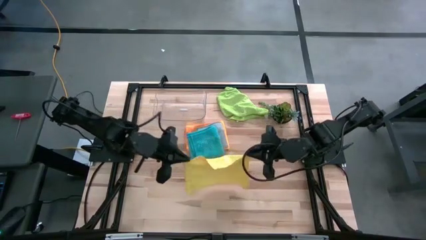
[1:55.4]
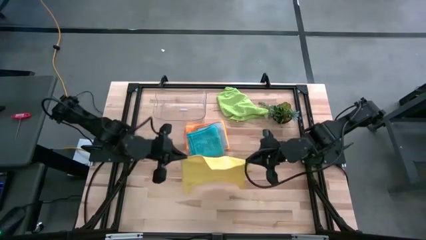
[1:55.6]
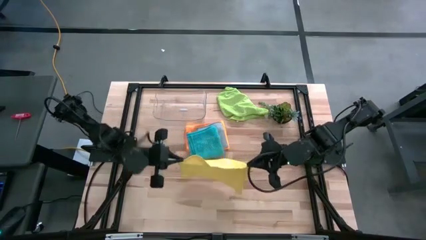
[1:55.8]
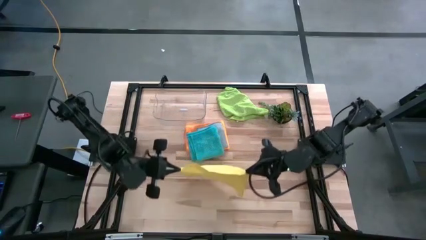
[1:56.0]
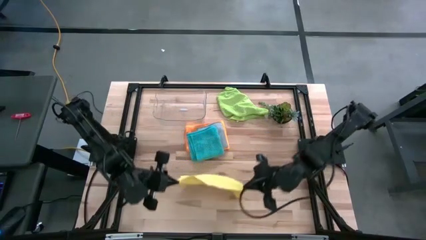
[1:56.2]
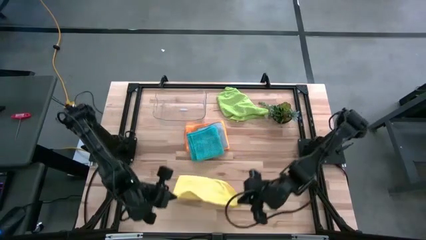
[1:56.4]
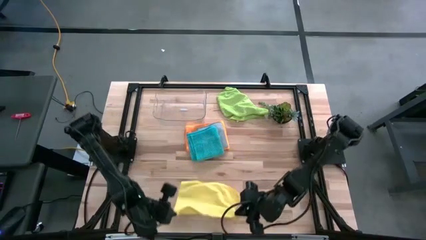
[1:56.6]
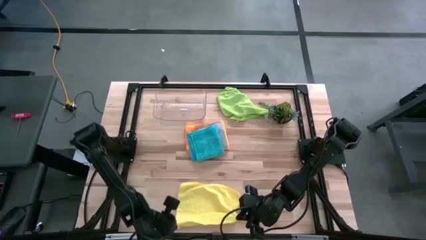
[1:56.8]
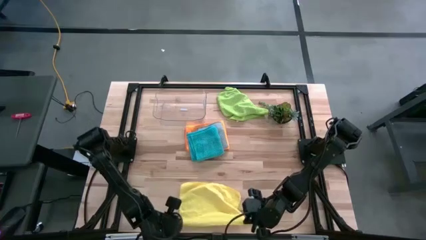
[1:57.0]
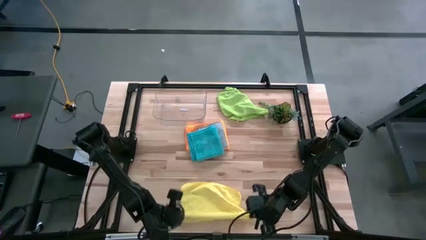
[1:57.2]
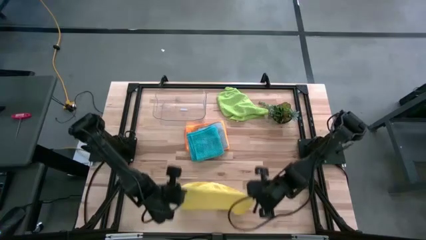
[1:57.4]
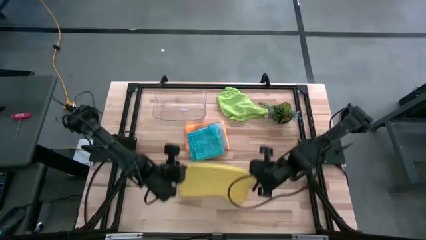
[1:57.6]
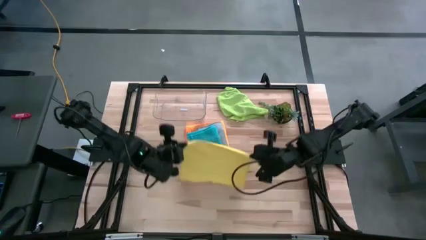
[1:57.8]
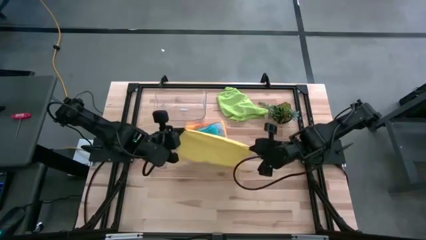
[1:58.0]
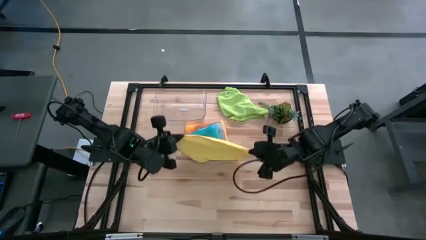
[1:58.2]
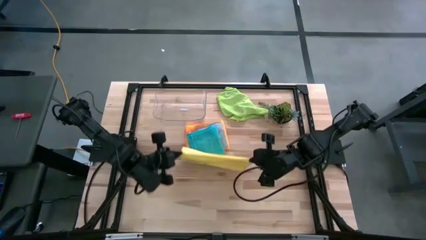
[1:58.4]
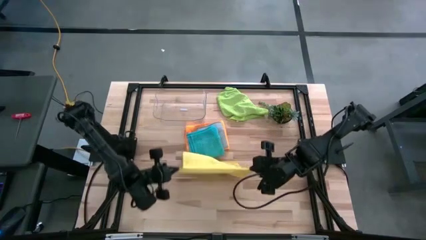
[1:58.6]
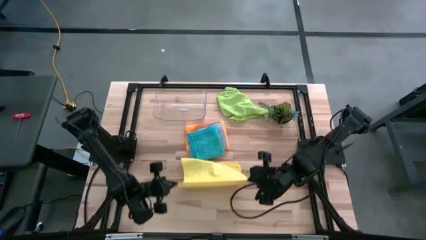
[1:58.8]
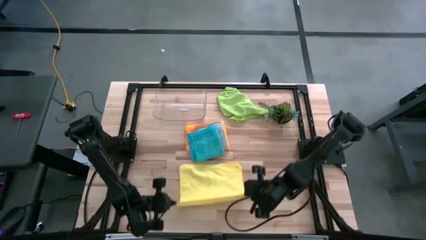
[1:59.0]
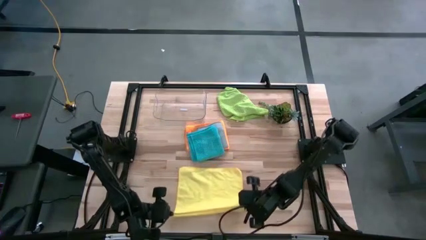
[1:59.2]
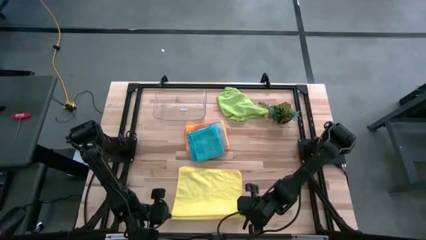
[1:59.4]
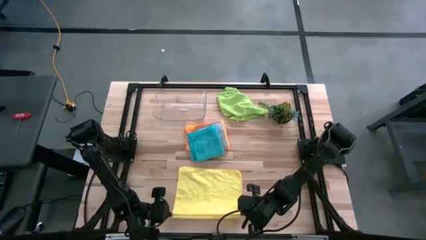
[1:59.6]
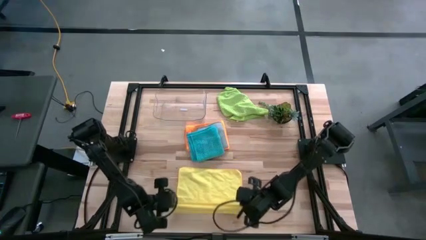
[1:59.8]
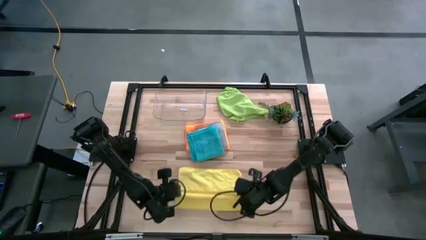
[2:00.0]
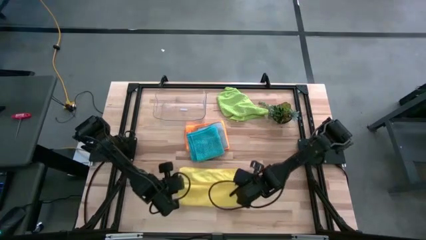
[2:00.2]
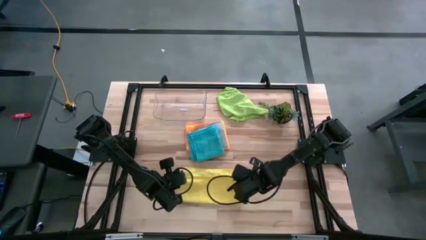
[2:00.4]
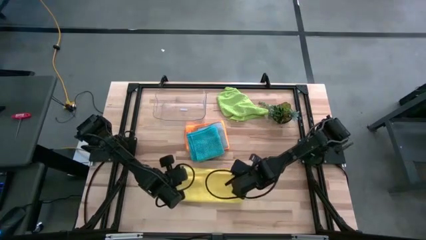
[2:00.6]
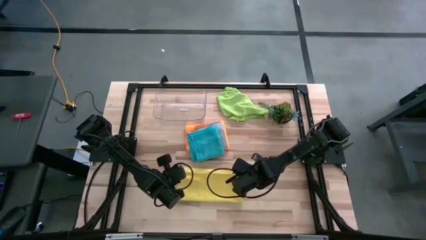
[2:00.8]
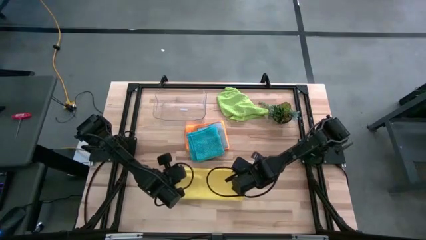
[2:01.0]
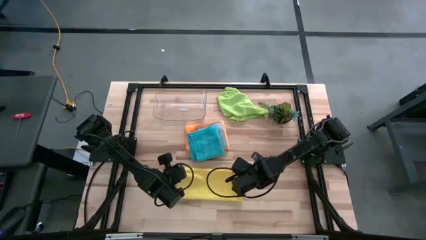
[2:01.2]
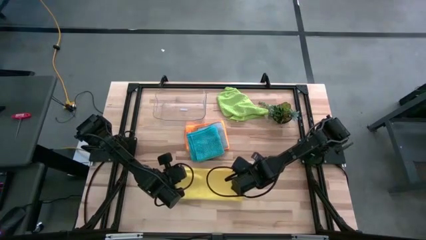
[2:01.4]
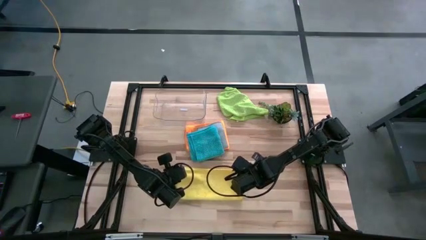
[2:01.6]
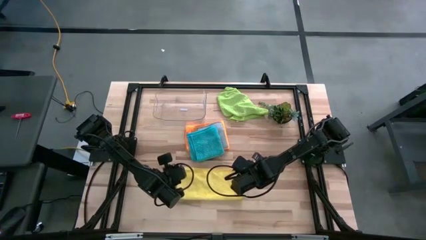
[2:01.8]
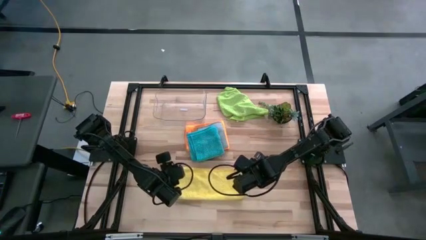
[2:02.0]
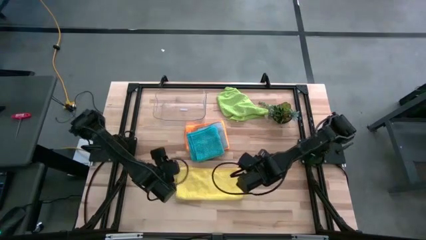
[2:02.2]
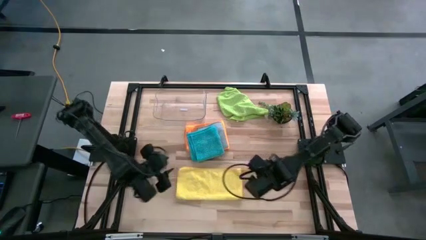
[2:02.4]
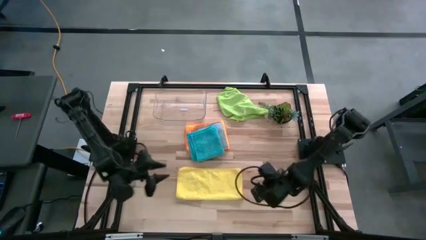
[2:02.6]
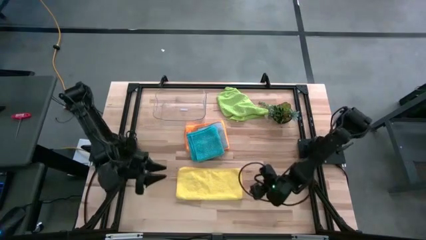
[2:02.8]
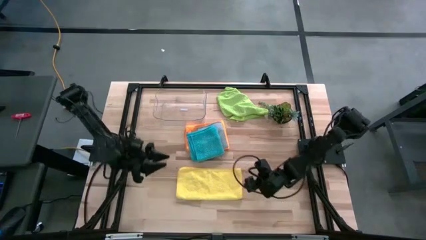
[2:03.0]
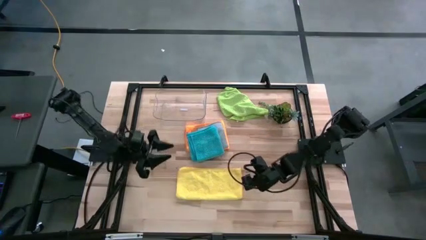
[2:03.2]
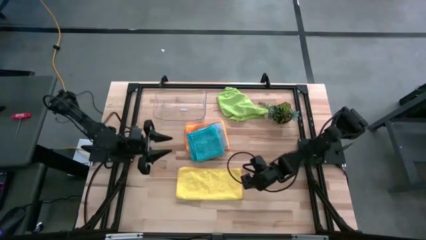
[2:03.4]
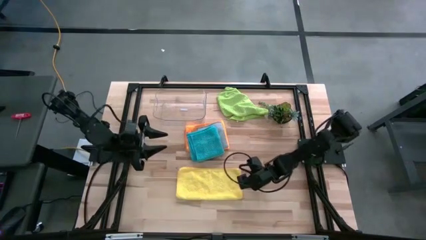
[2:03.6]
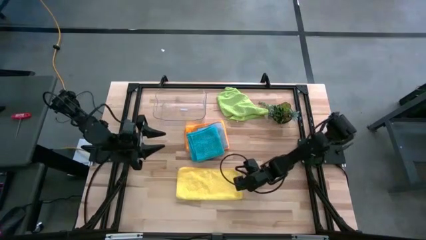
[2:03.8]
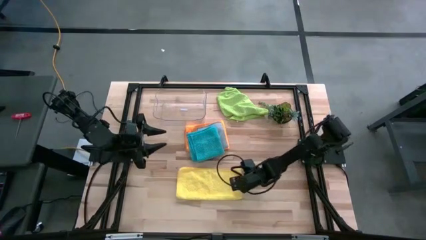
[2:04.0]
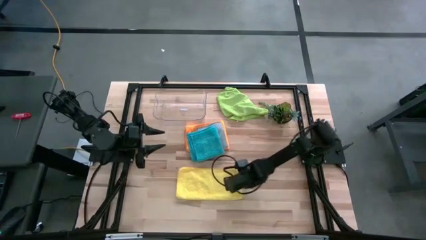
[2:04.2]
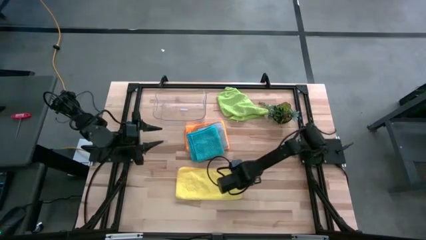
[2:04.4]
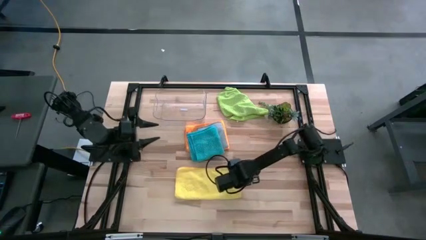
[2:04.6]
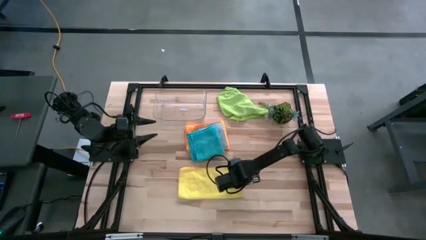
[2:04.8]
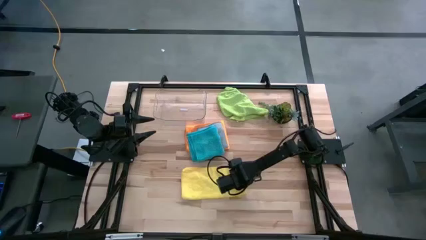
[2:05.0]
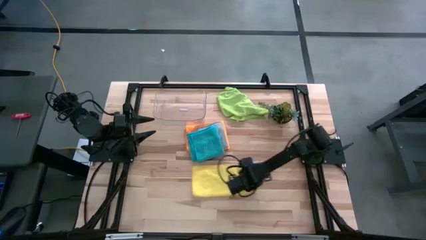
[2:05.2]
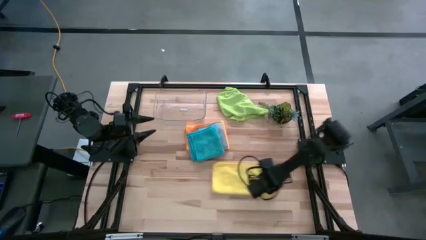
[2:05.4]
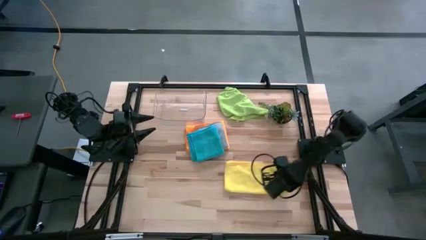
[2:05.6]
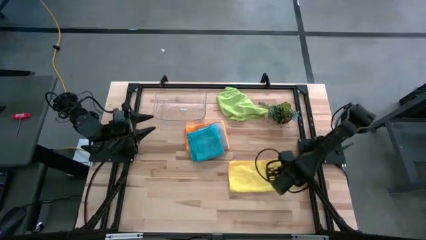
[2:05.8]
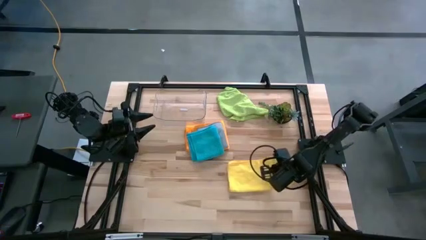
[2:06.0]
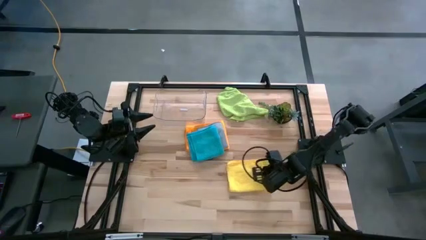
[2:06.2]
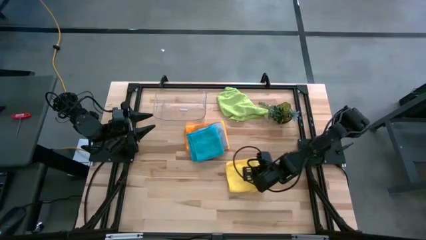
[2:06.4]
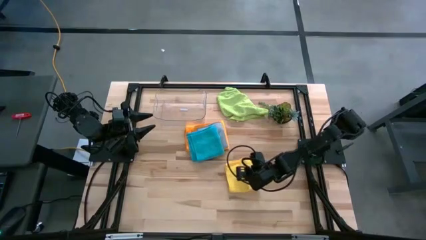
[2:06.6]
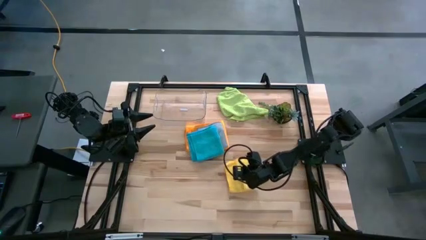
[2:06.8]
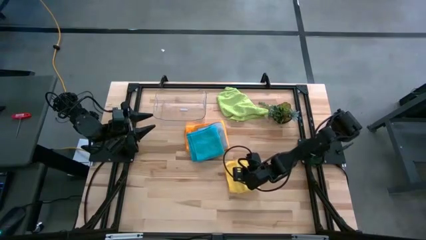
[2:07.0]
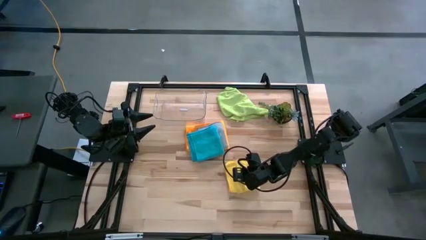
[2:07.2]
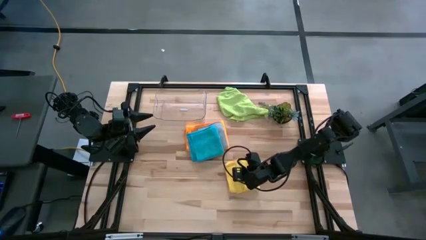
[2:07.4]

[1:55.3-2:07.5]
Task: Fold microfiber towels
Fold the yellow towel

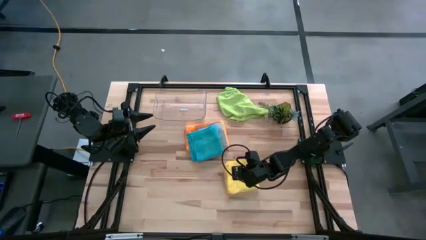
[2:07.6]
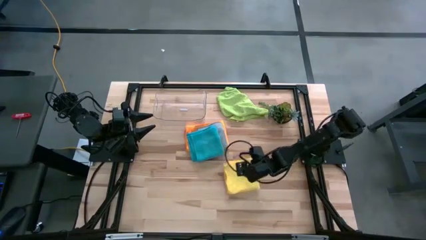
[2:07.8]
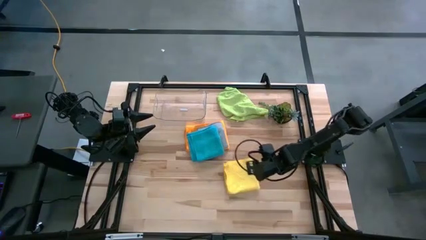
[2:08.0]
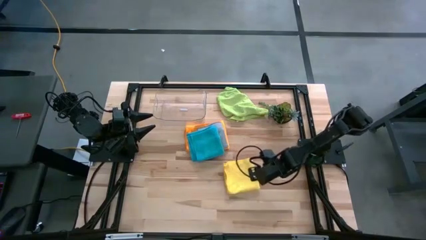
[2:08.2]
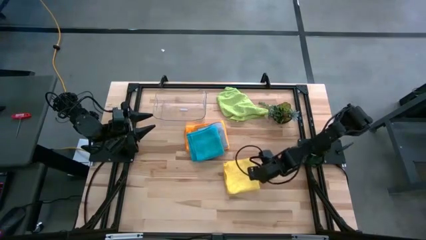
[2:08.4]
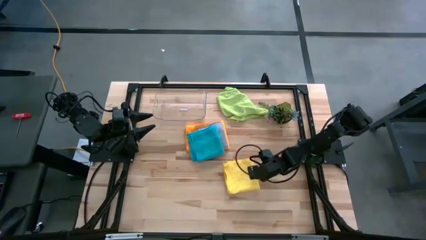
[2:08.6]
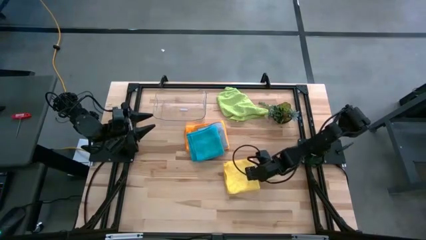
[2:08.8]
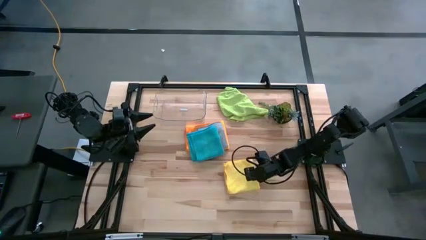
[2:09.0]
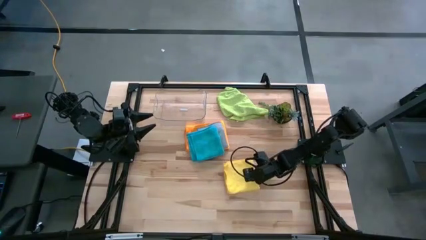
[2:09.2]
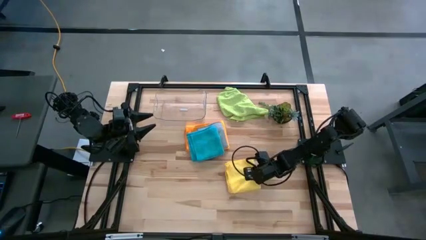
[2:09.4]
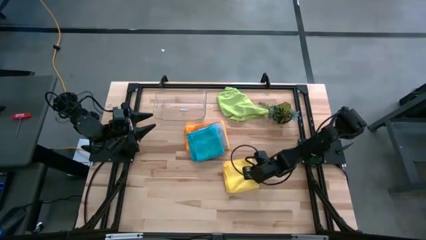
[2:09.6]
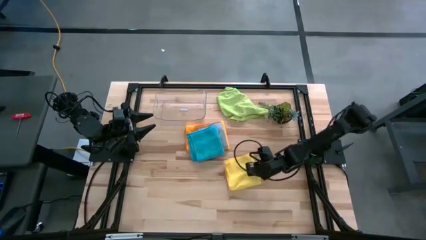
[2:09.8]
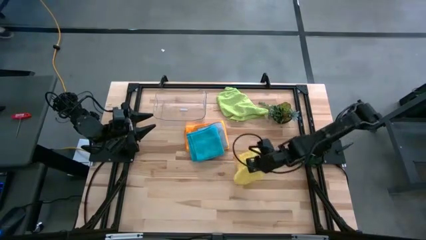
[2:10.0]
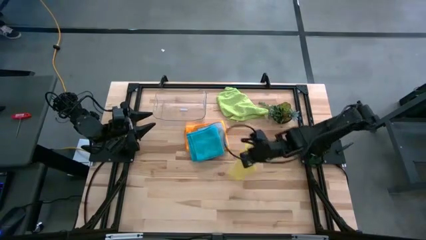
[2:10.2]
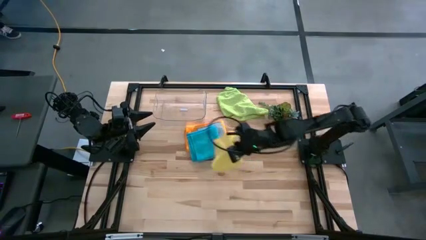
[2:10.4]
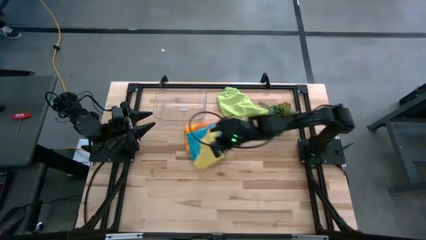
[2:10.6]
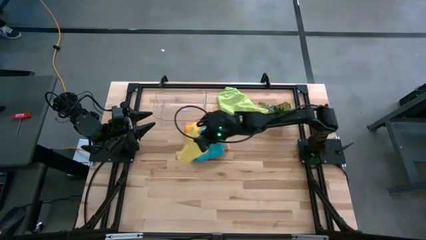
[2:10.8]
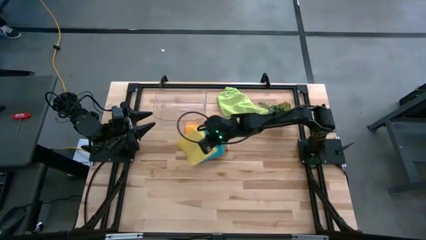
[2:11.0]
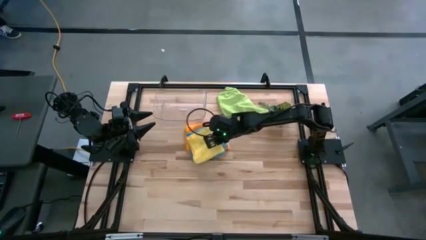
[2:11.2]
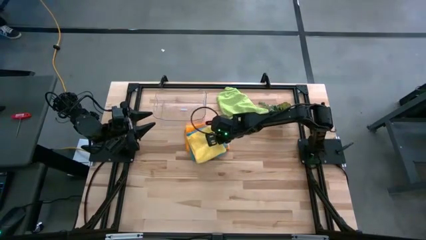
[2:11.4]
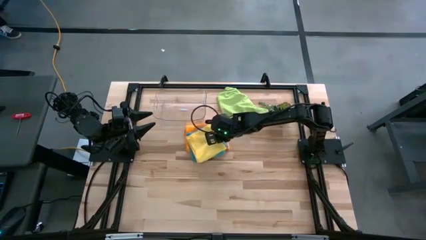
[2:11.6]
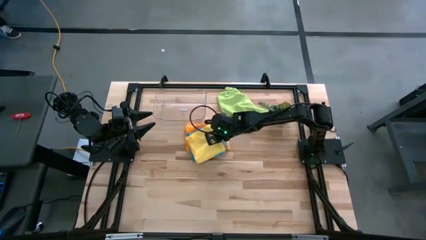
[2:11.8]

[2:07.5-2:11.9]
Stack the yellow towel on the blue towel
